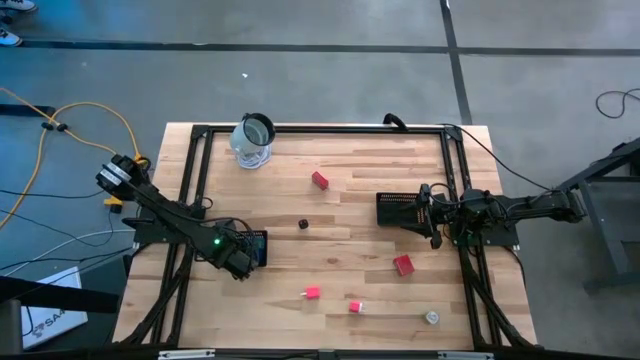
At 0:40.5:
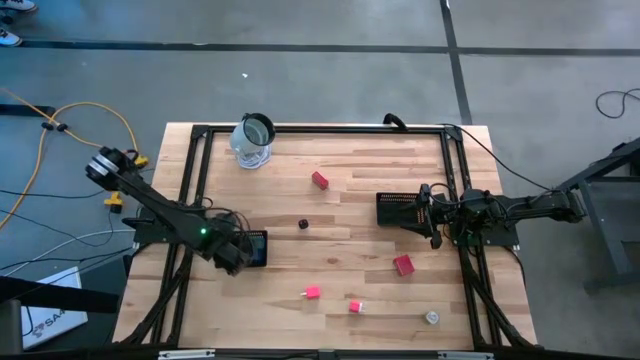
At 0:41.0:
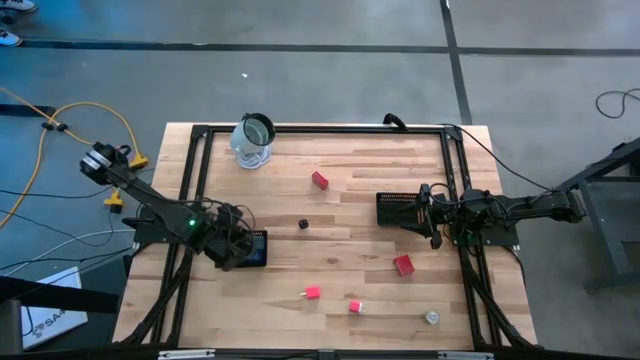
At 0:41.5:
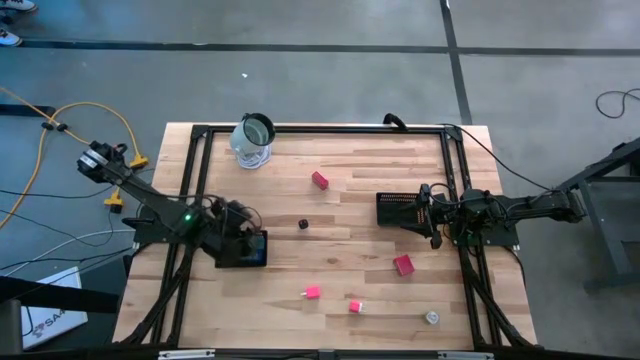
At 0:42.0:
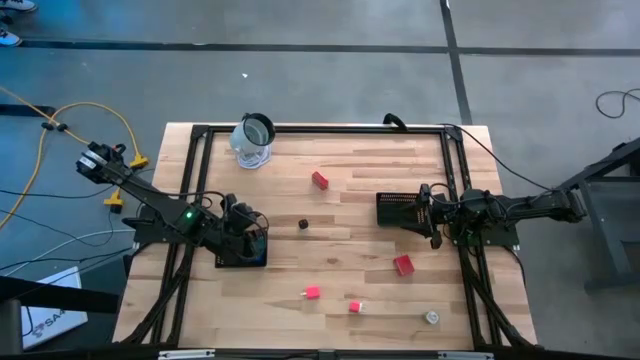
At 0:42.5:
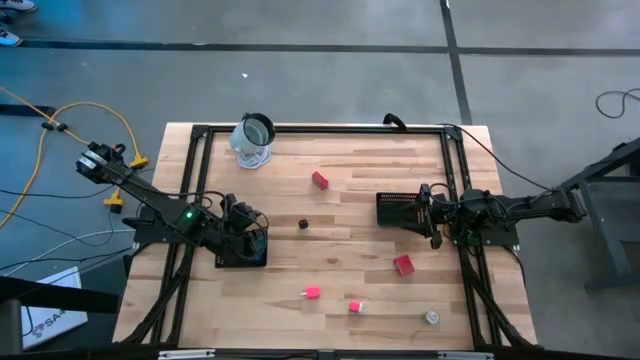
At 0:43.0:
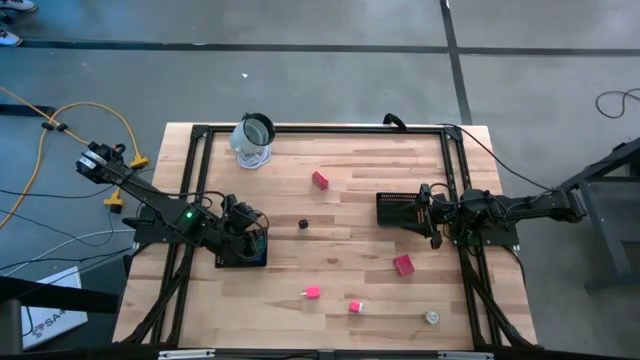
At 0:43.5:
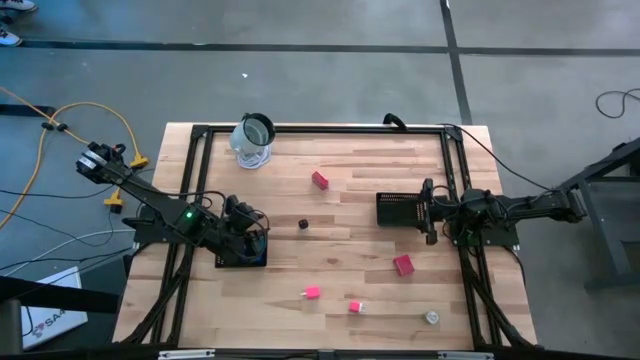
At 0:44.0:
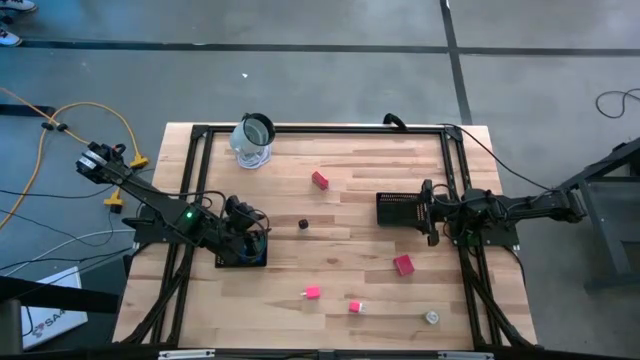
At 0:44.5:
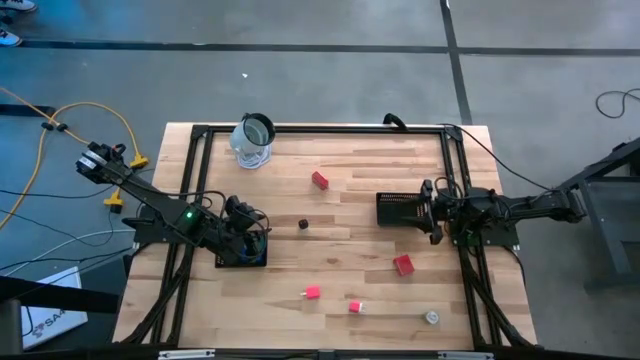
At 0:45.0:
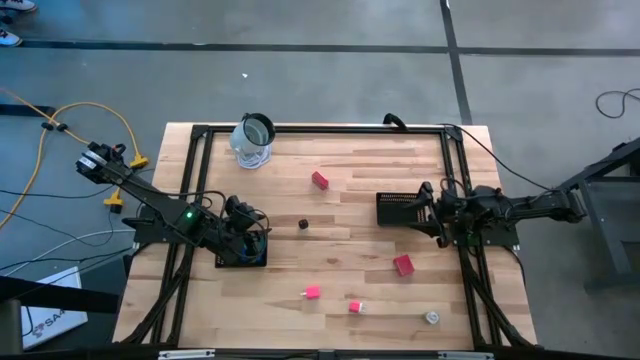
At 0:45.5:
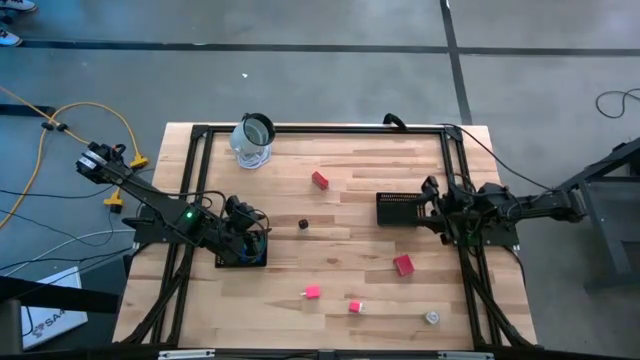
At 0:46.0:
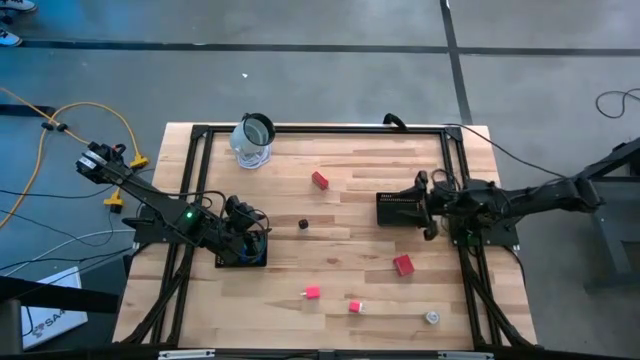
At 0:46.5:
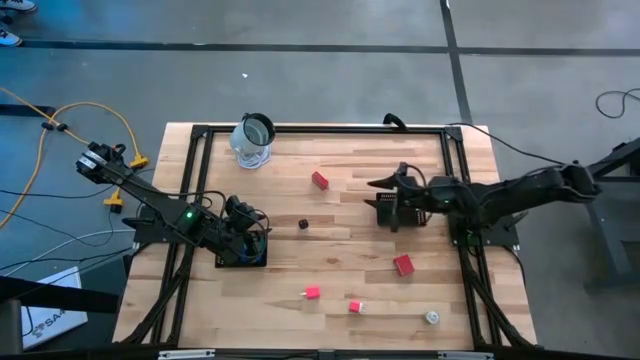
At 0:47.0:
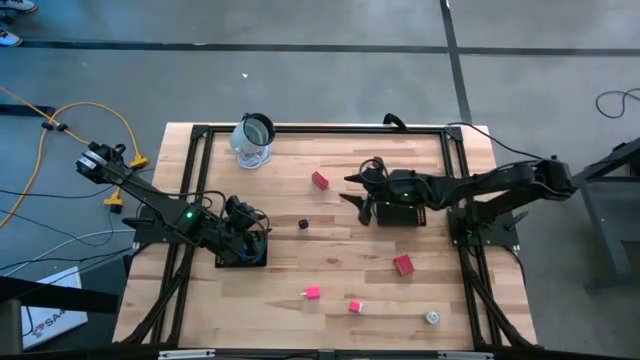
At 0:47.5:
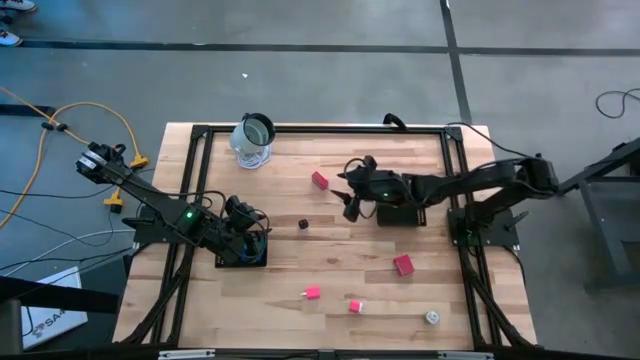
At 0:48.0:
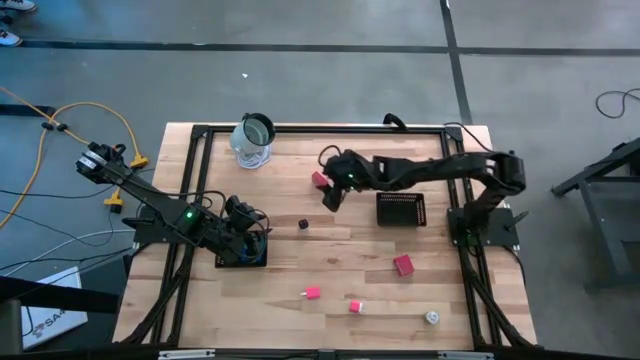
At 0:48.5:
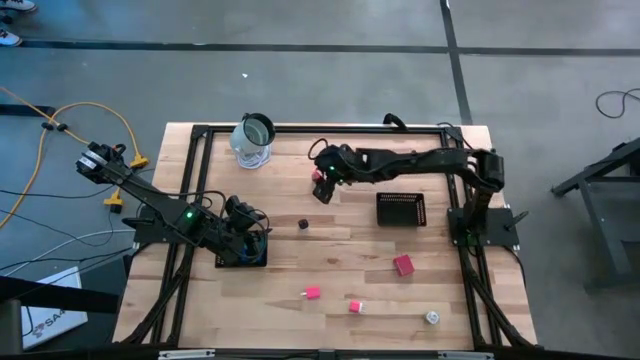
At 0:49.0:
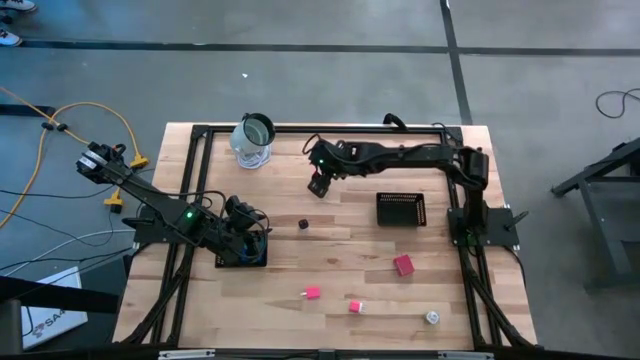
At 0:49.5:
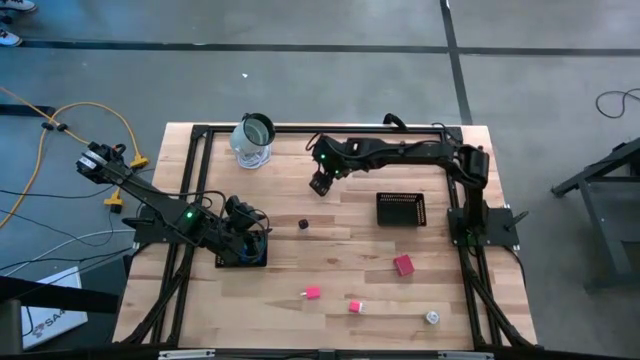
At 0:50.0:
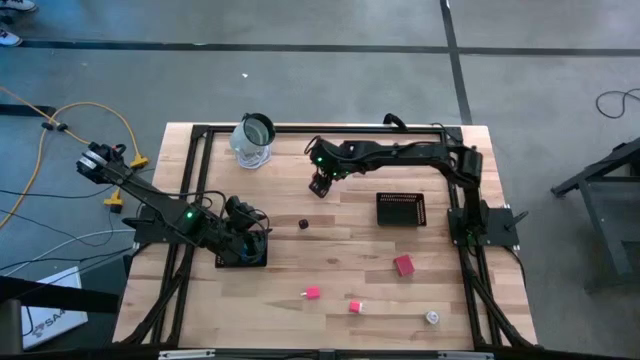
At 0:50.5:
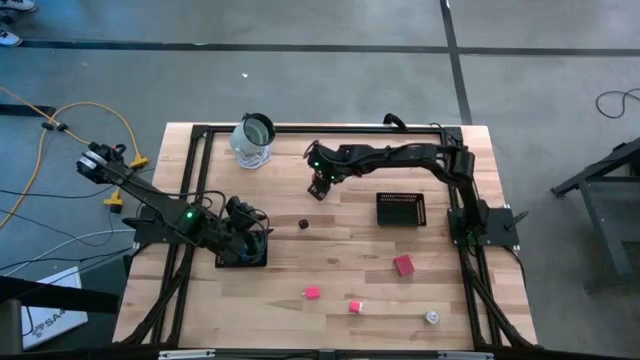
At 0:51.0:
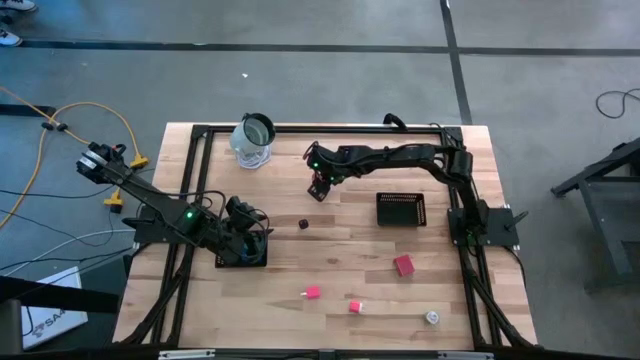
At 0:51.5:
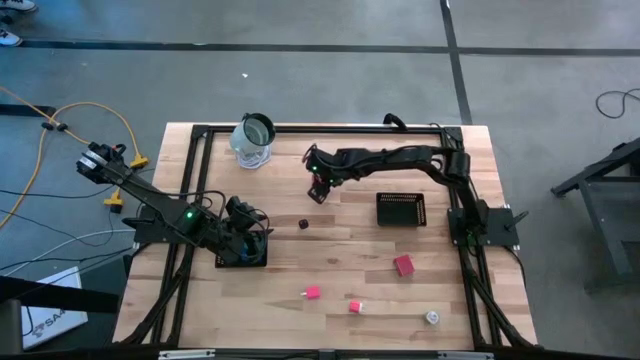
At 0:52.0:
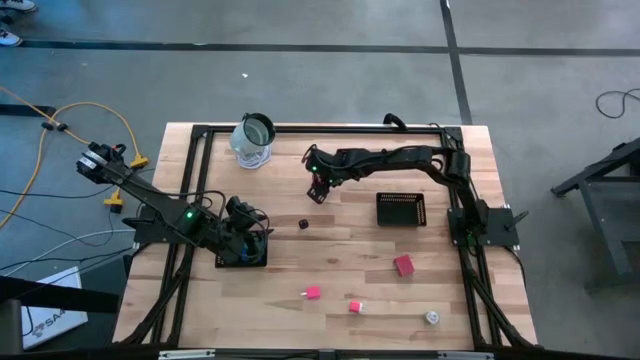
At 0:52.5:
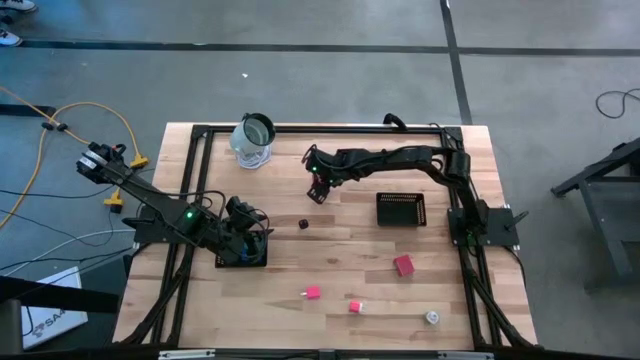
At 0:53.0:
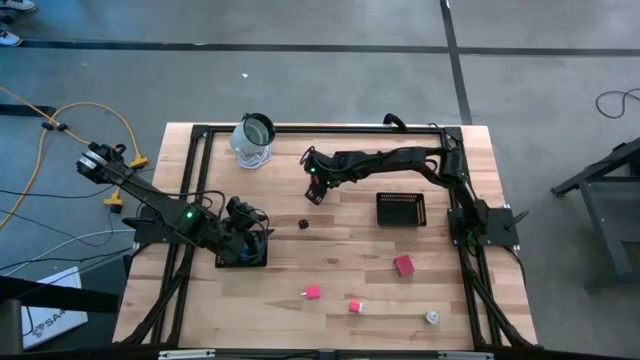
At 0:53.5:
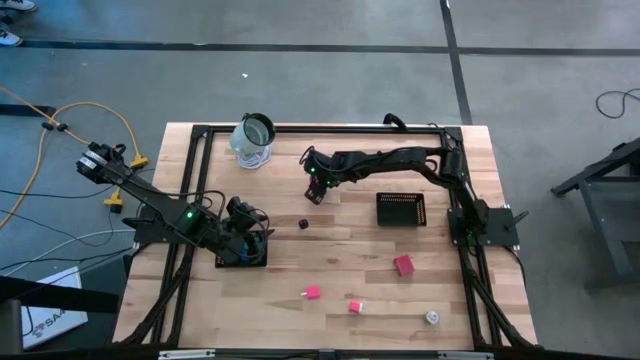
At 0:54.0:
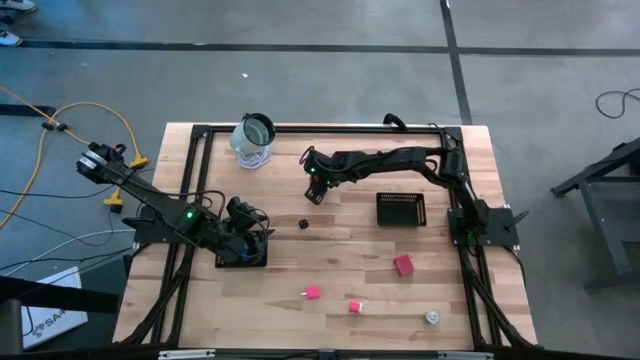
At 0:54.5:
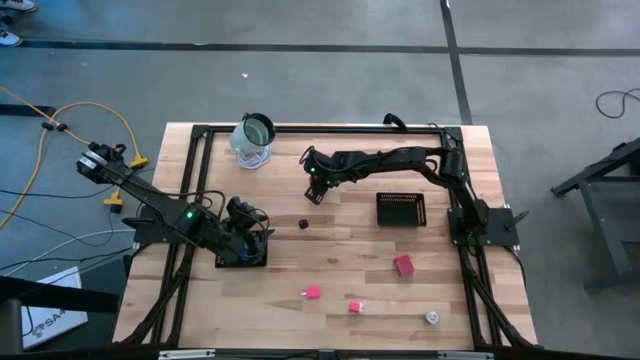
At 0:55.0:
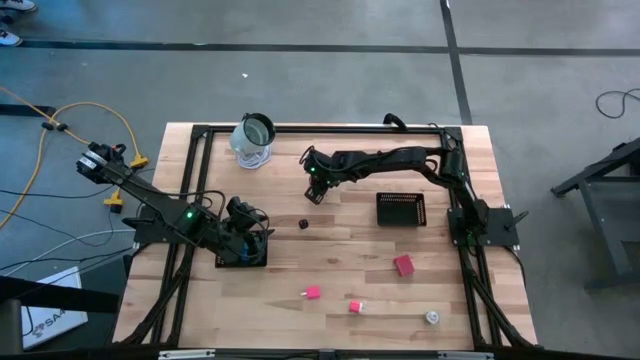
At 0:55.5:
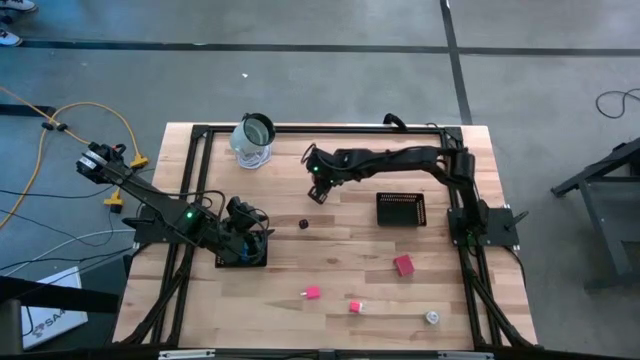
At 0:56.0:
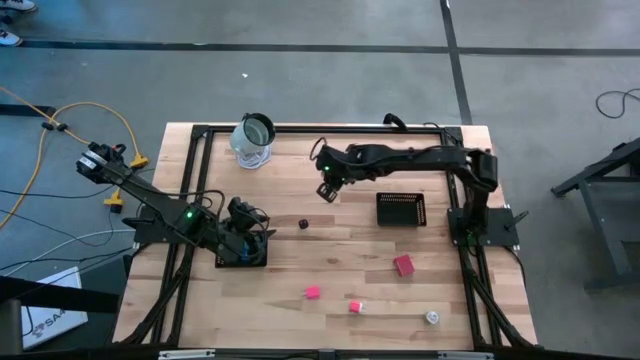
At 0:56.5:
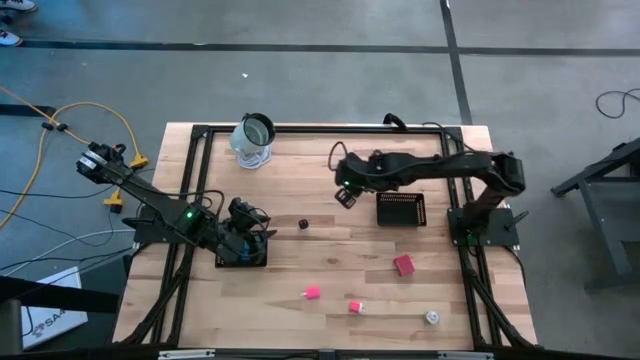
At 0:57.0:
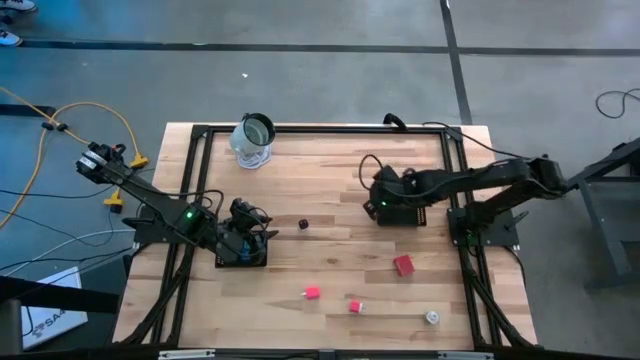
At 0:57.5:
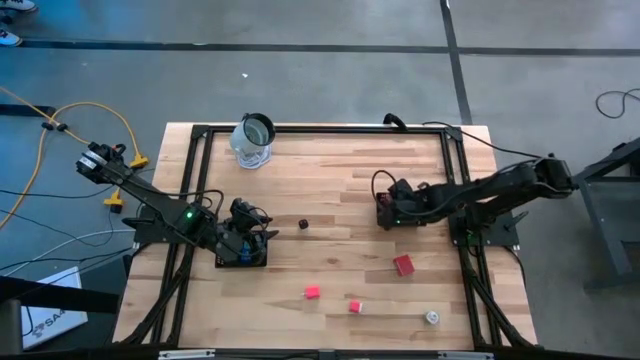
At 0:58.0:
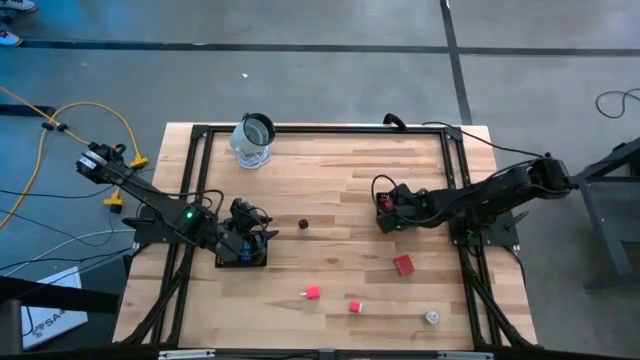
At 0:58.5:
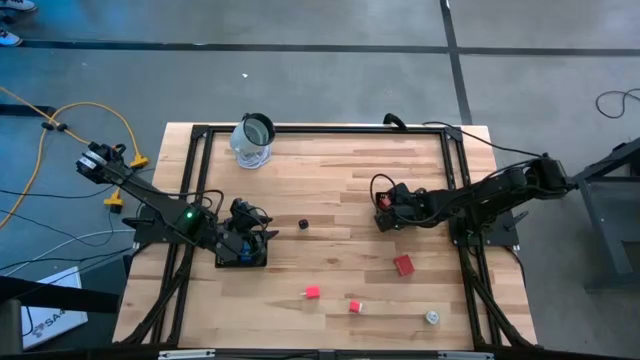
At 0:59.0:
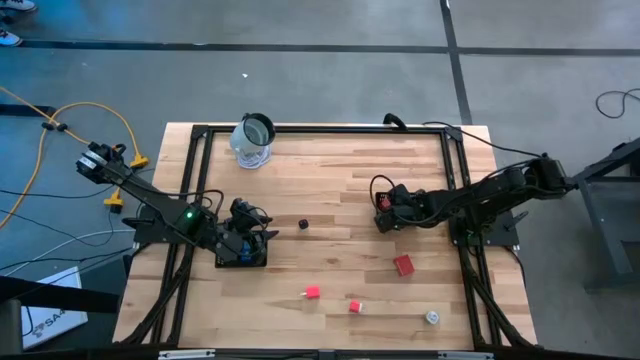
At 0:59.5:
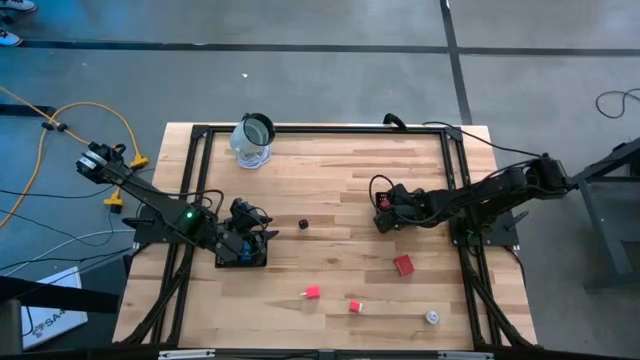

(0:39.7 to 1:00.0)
Task: Pick & Place Office items
Put the top red charger adapter into the right black bin

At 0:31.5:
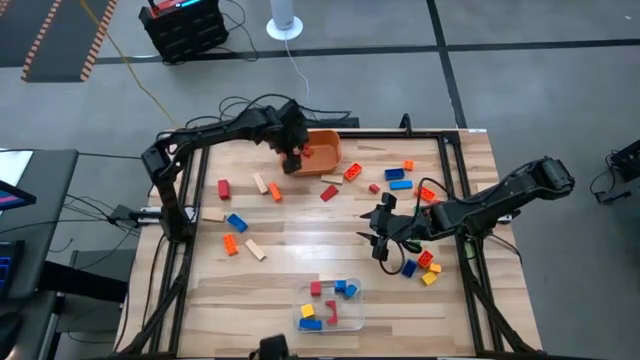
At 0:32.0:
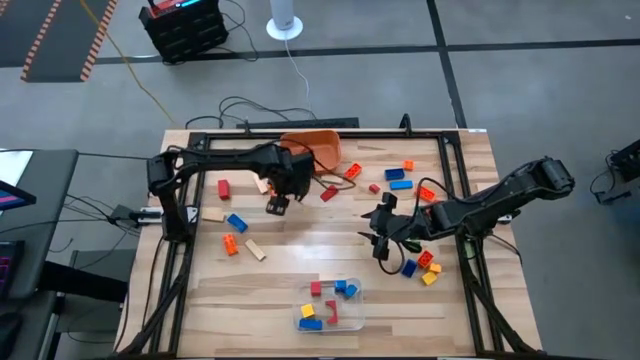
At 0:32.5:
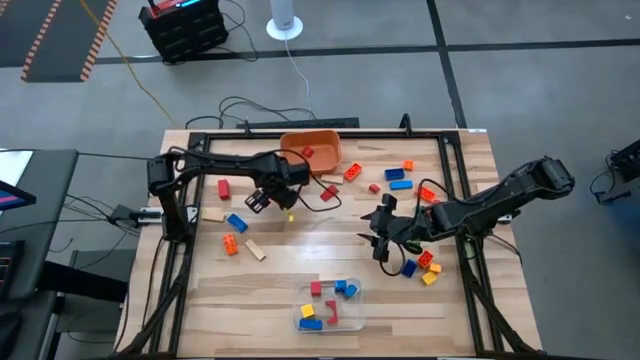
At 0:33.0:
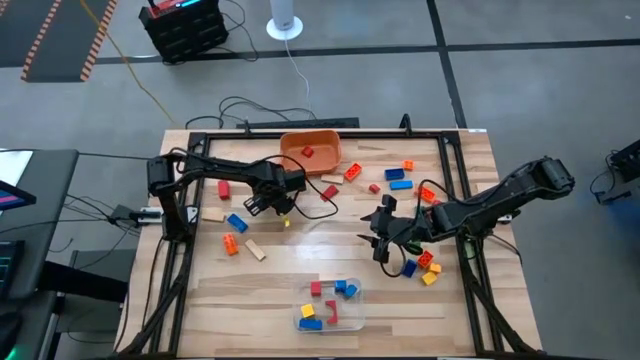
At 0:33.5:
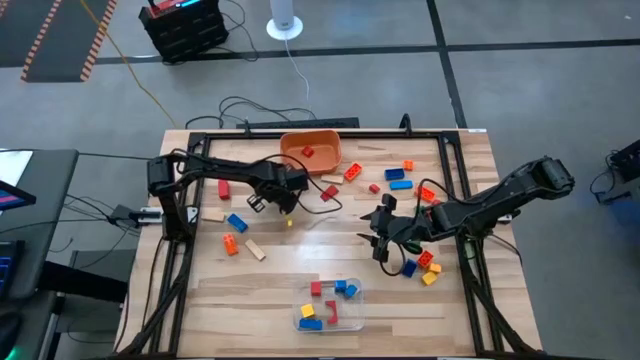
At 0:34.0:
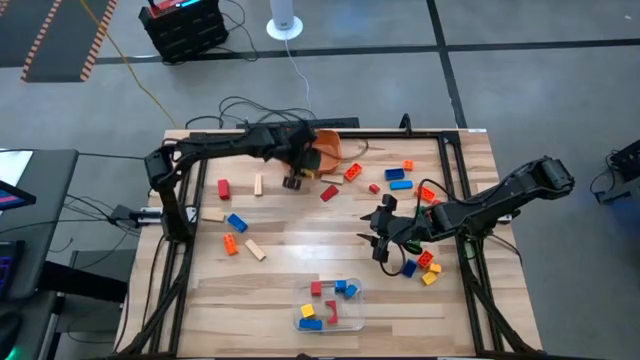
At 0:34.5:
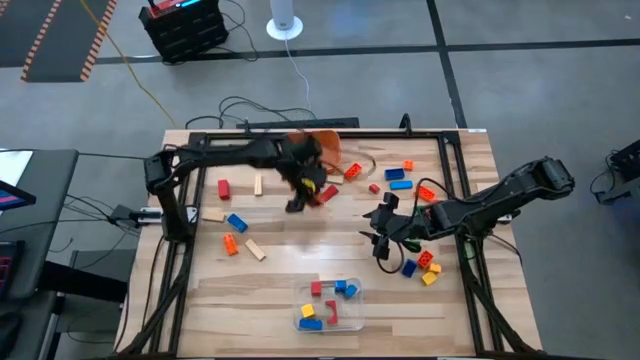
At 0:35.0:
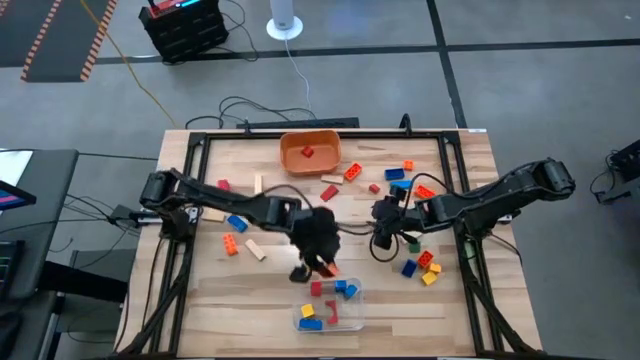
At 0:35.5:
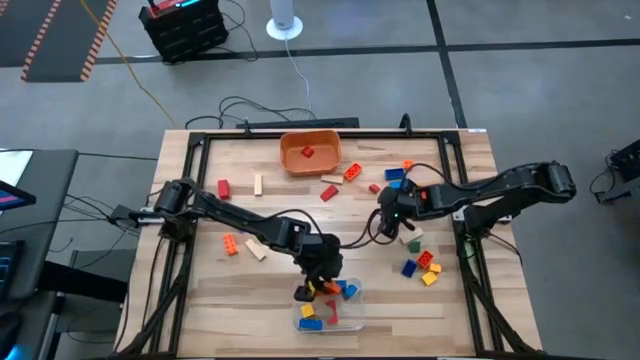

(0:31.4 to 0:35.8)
Task: Sort blocks by size
Put the large orange game piece into the transparent bin
